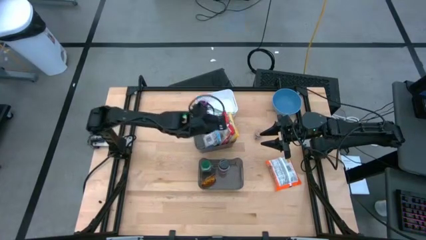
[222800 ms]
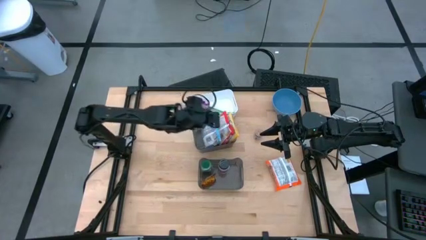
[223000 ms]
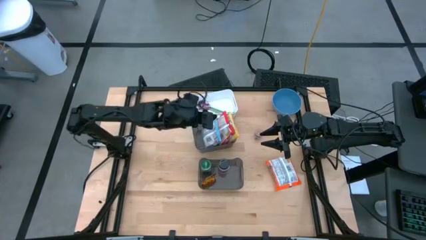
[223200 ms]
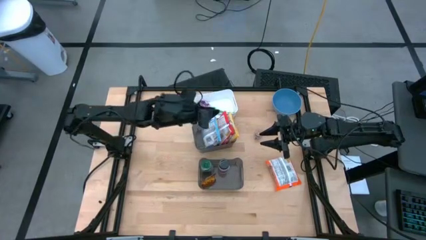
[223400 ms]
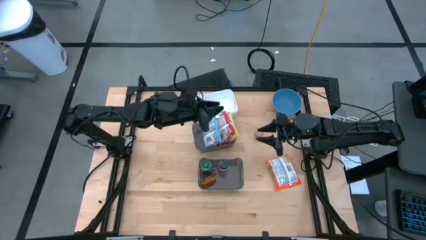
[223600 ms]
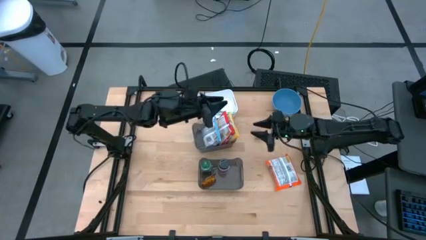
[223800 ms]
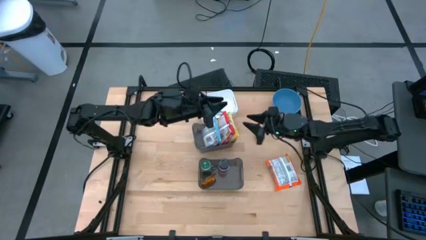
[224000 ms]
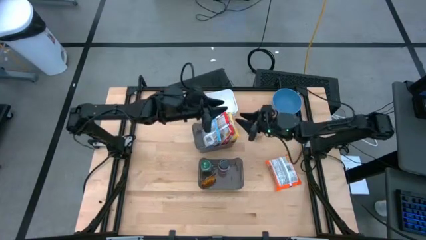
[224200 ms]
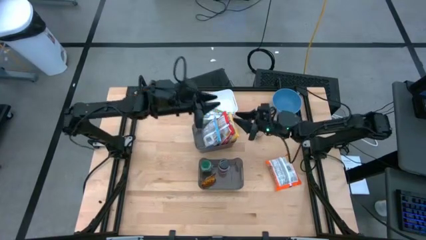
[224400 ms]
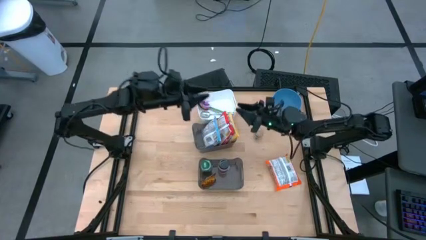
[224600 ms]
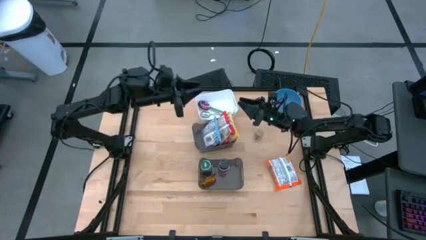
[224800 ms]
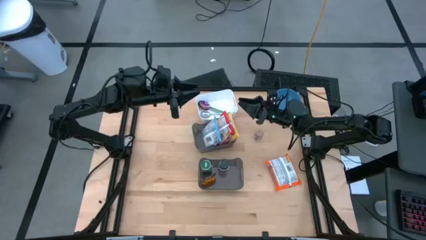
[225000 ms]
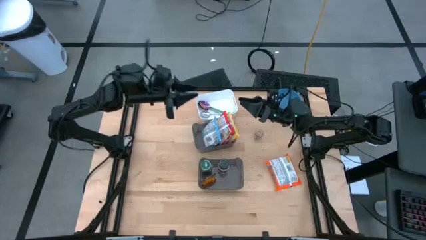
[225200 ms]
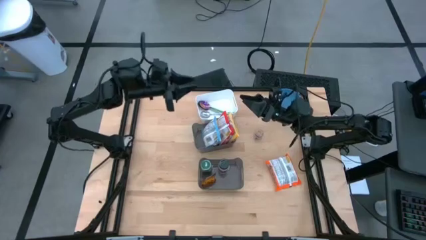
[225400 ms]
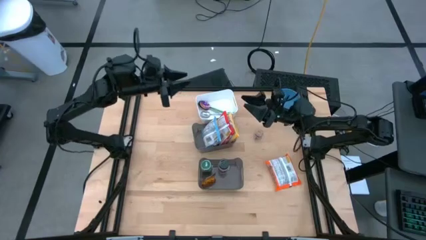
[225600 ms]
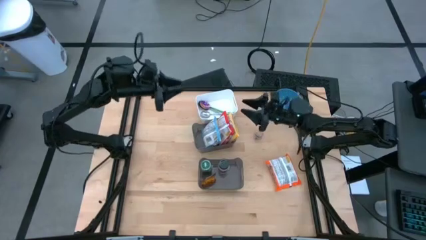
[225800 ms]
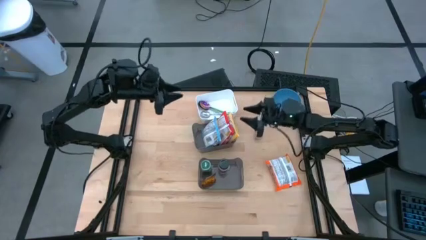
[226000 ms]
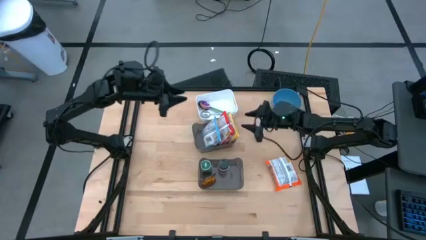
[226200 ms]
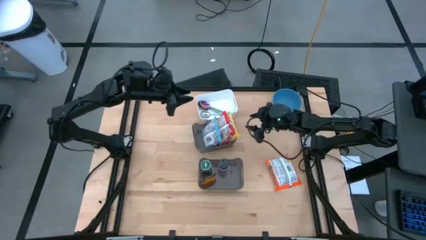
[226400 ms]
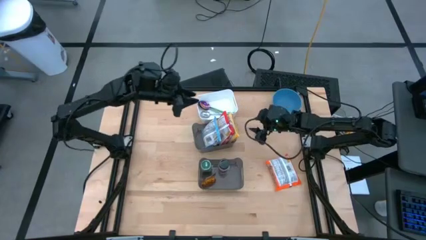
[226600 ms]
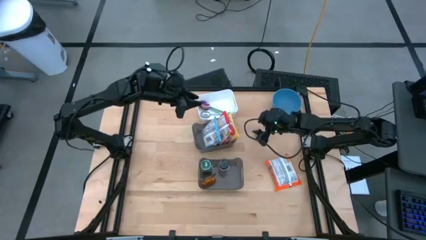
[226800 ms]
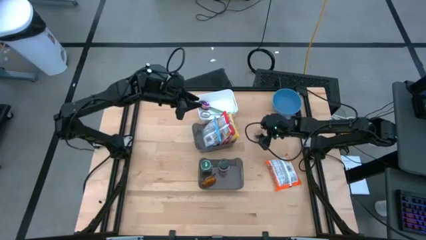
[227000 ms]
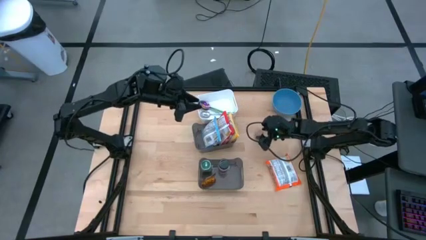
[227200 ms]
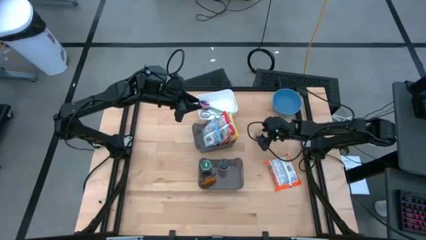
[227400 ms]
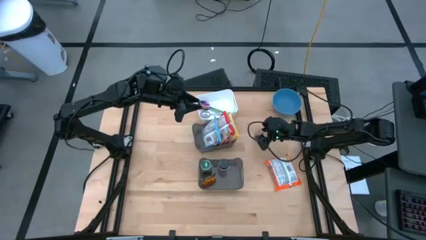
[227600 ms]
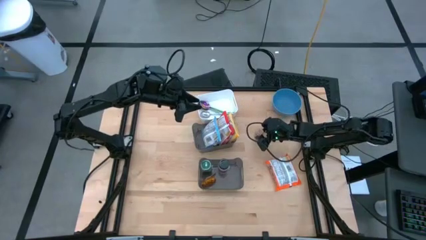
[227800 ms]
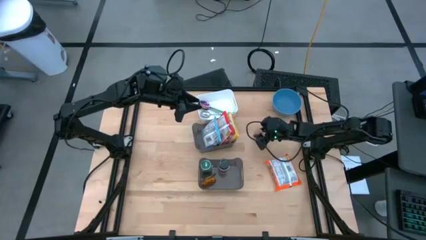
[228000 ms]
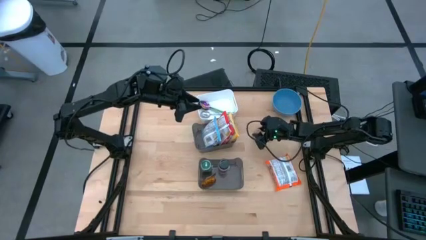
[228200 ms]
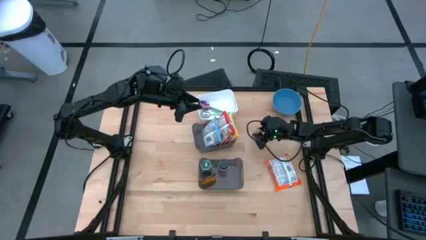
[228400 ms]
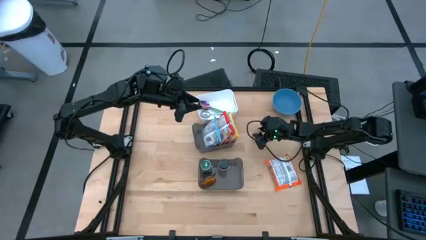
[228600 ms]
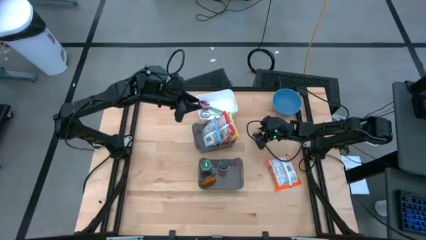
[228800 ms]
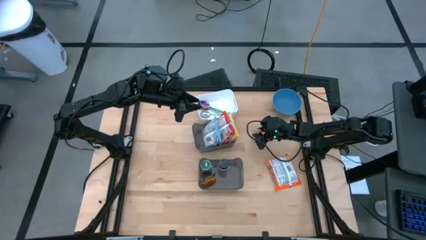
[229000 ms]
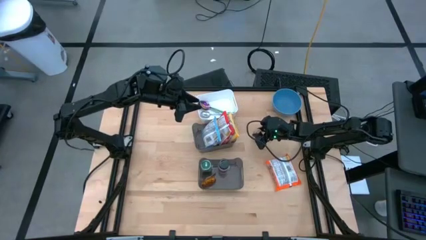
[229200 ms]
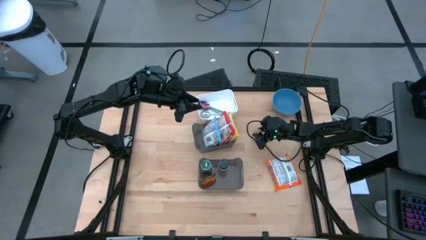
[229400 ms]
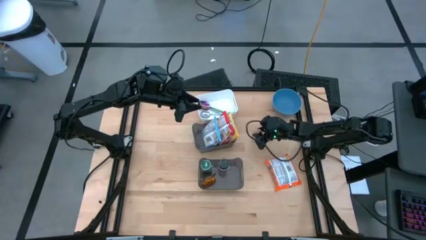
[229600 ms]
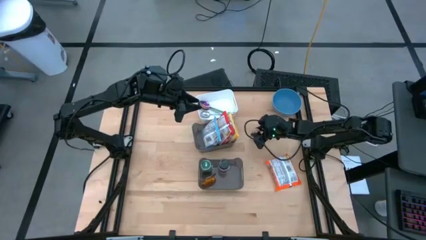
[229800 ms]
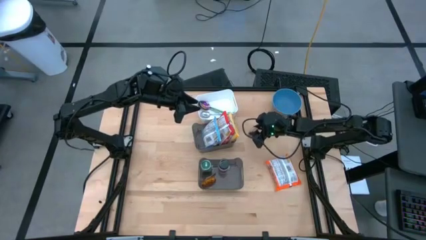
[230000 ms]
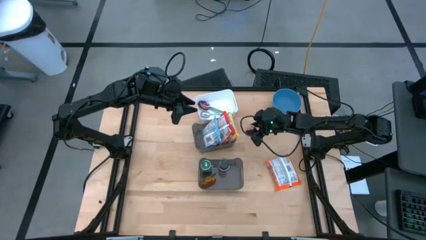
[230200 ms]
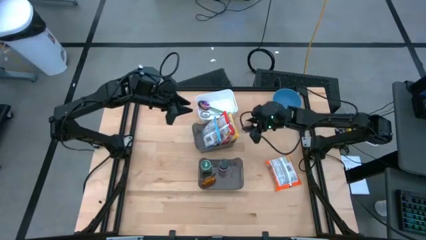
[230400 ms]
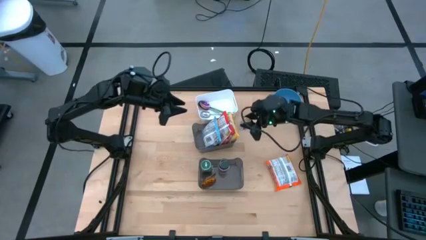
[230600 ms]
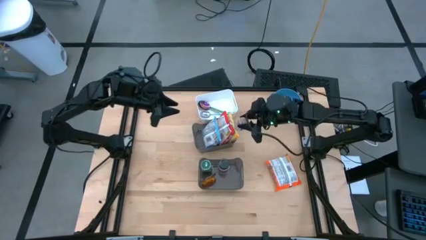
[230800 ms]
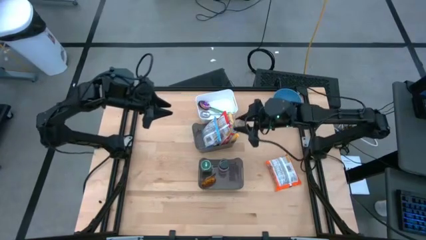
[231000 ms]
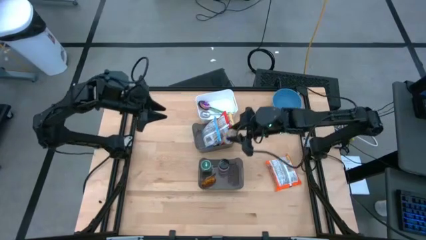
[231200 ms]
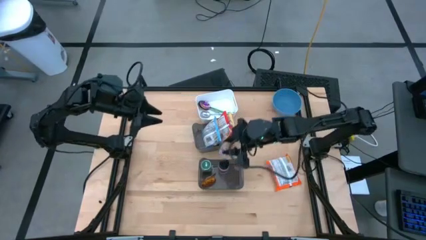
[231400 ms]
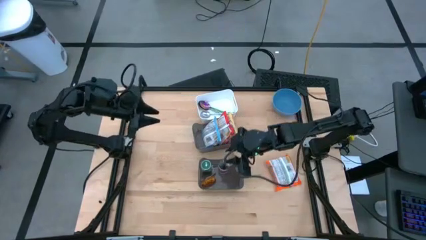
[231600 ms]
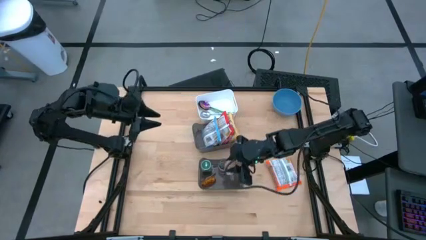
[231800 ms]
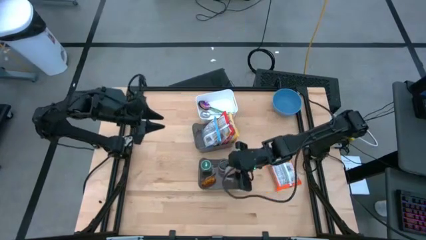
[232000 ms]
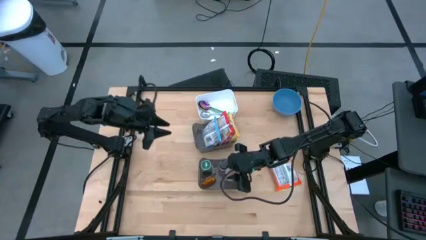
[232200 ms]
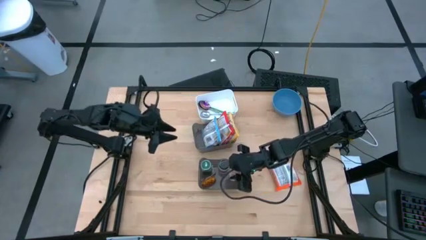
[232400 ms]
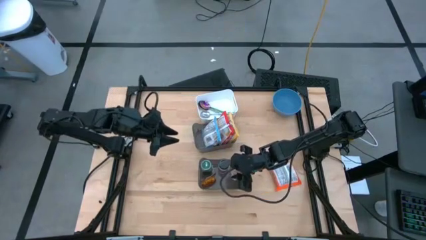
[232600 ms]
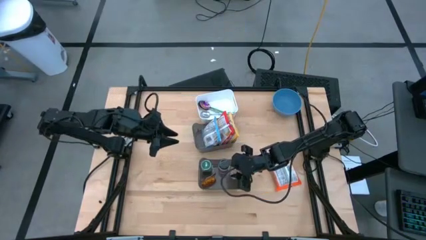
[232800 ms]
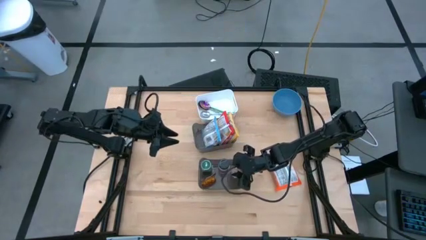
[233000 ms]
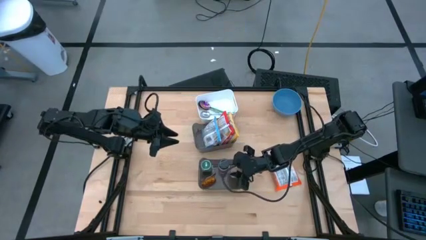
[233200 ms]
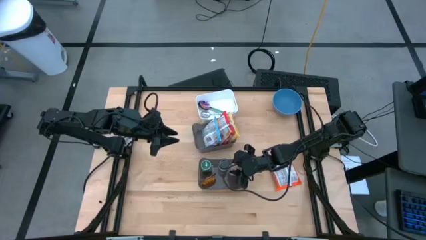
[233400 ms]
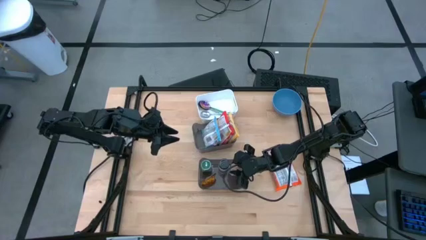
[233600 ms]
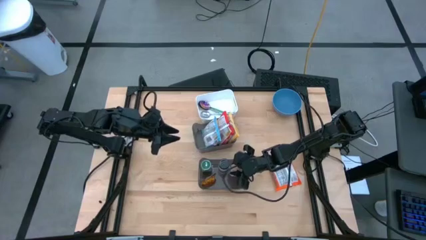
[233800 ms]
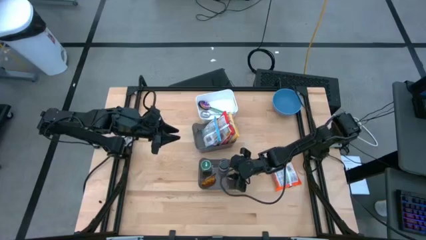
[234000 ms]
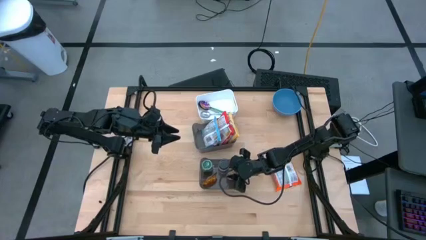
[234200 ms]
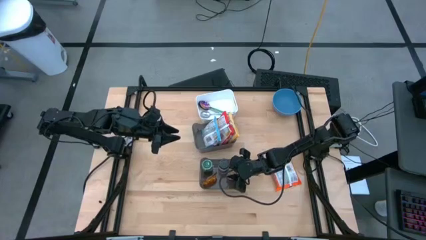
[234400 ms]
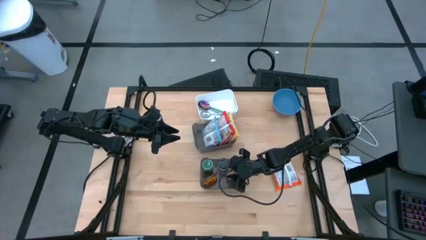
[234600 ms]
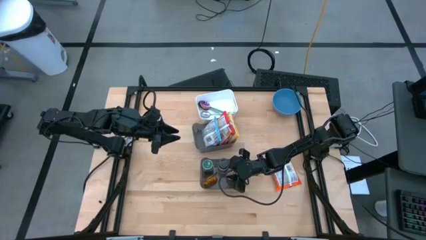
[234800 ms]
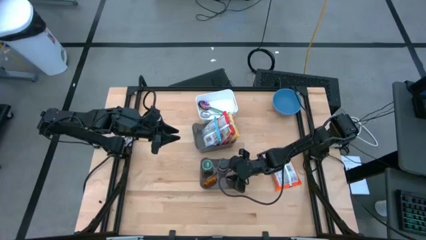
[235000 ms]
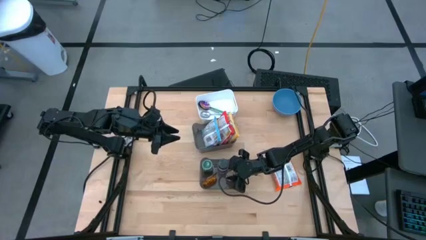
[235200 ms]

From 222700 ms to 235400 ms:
Task: Pick & Place Food Item
Put the brown seasoning bottle into the bottom black bin

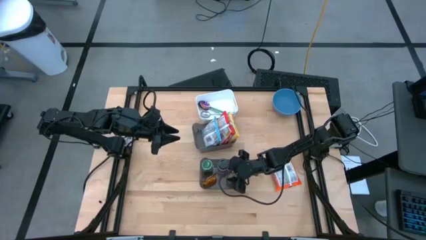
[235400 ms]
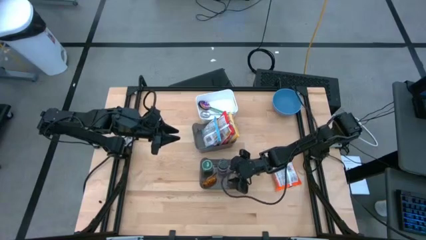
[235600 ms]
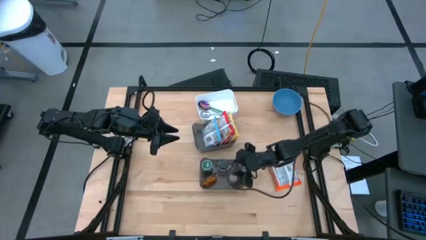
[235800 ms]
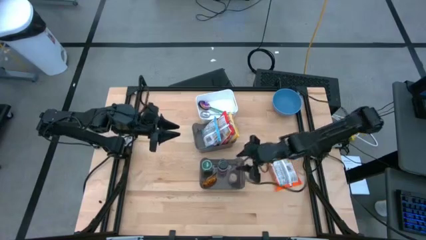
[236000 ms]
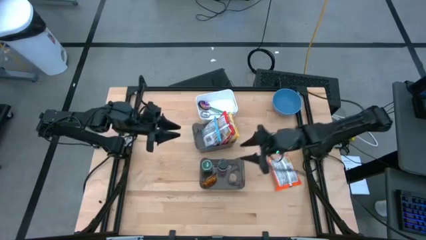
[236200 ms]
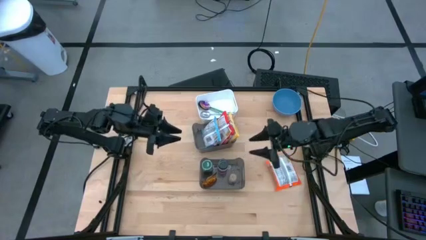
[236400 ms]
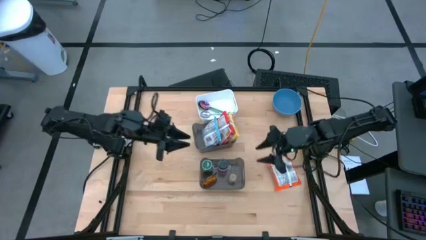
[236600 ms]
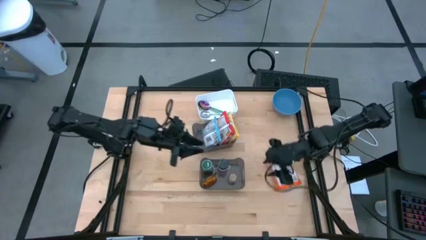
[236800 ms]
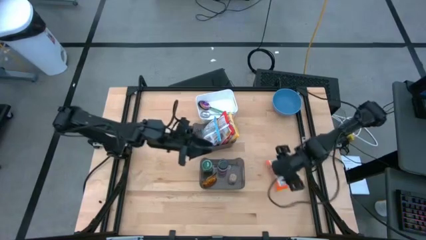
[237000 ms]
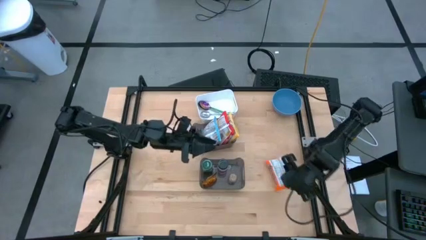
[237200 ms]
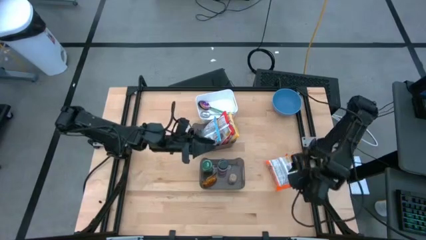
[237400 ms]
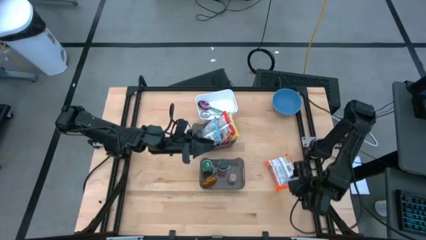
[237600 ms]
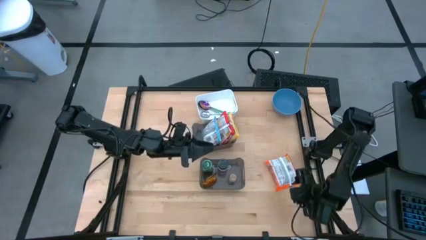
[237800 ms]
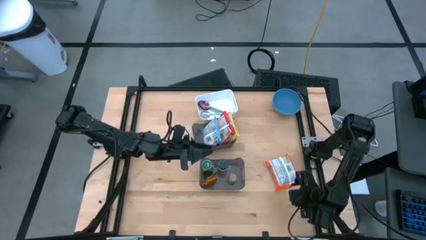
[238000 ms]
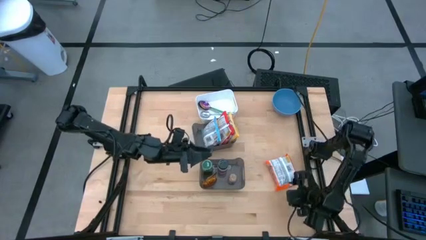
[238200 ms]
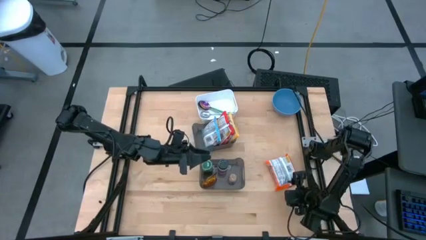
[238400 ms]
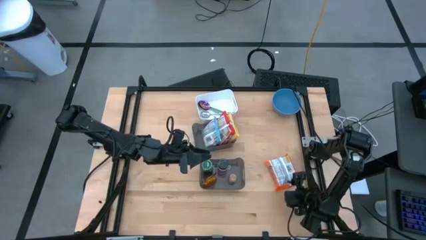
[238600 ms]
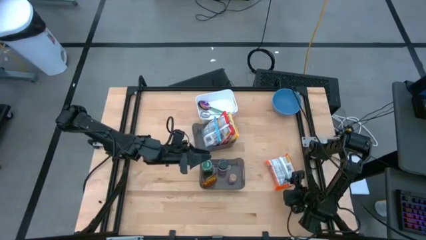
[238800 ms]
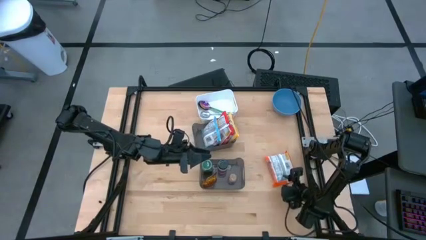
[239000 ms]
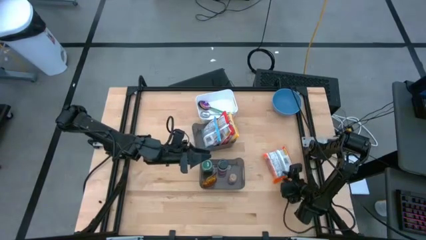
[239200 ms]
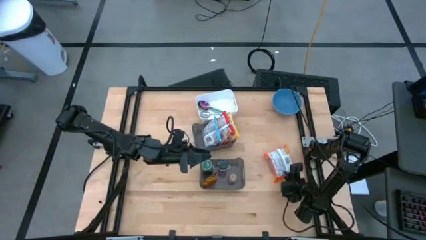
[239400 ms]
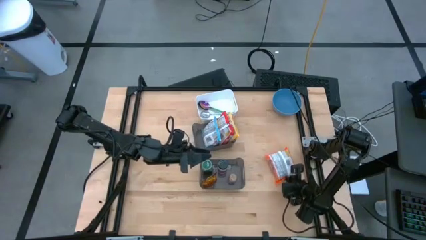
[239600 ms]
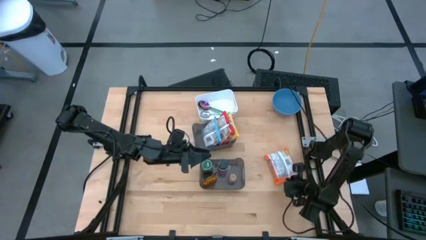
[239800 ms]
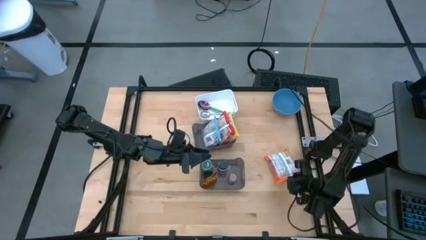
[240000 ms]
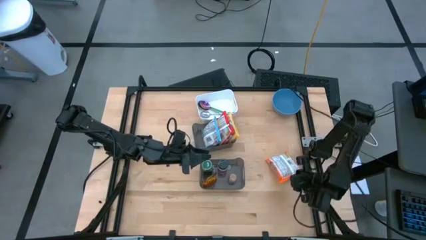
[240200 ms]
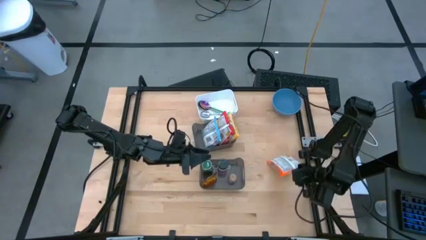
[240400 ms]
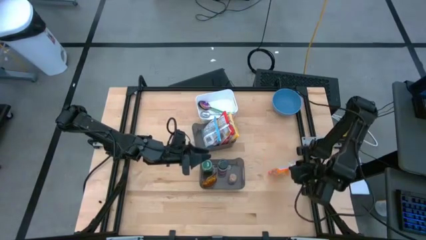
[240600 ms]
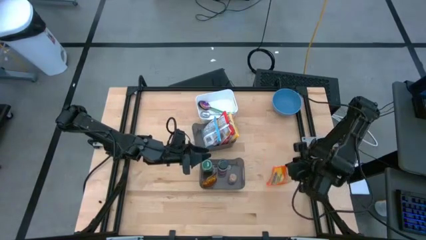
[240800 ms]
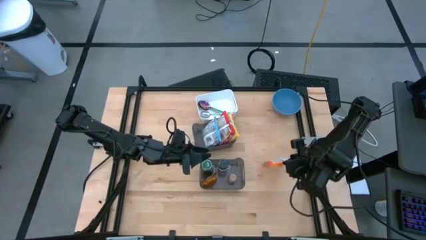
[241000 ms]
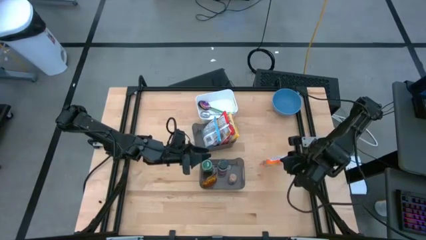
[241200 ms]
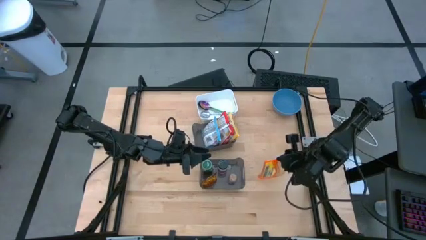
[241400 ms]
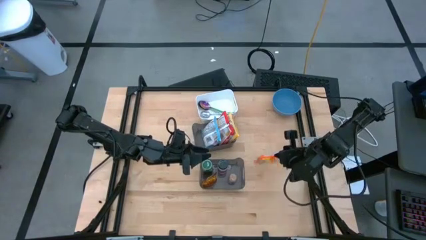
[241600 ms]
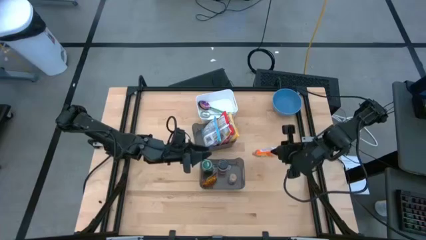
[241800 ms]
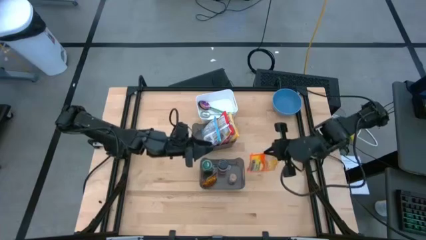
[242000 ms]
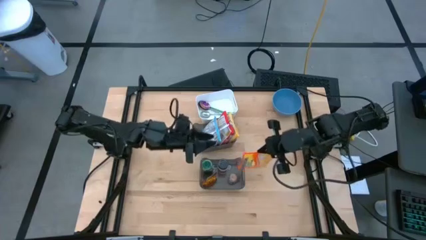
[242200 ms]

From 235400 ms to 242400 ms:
Put the orange noodle pack into the top black bin
